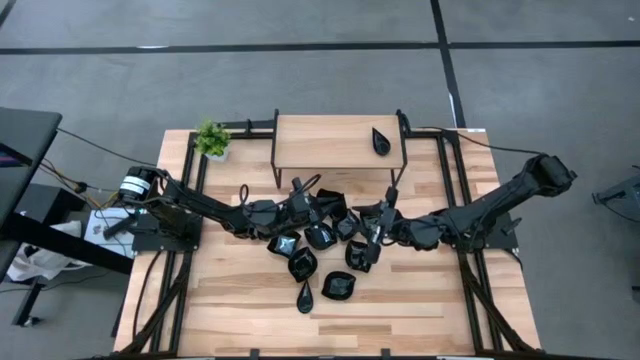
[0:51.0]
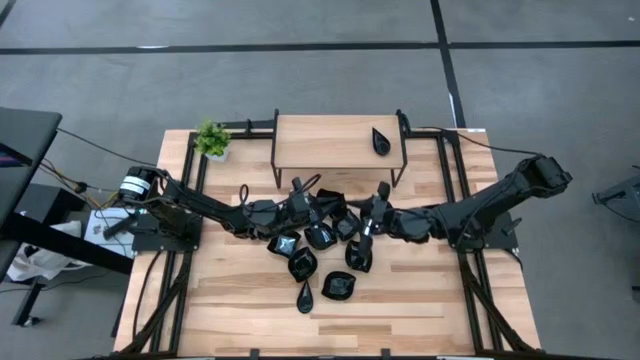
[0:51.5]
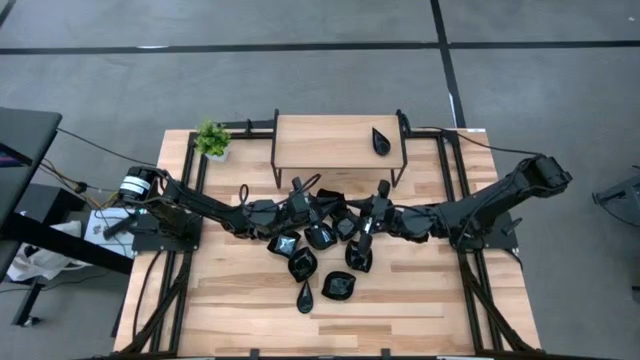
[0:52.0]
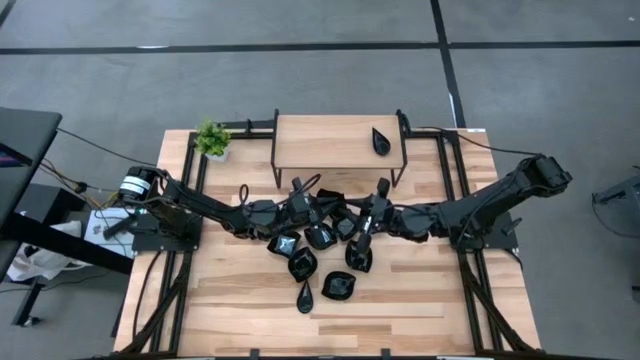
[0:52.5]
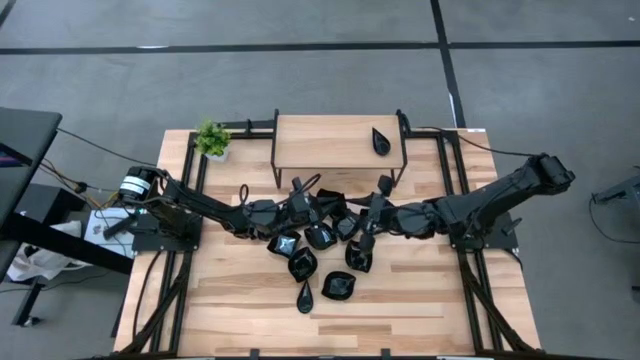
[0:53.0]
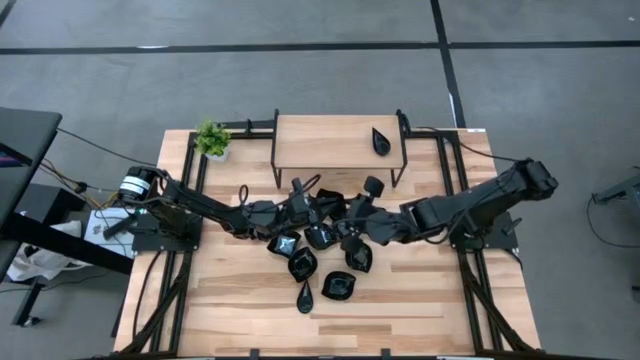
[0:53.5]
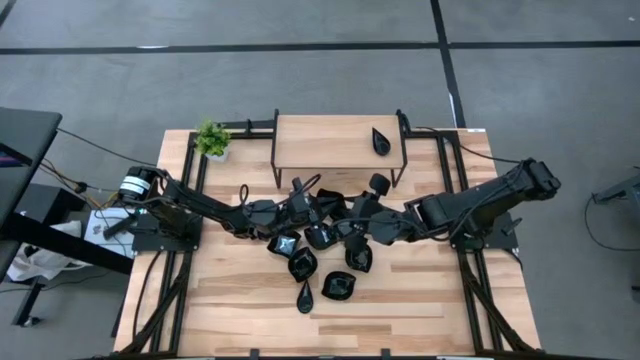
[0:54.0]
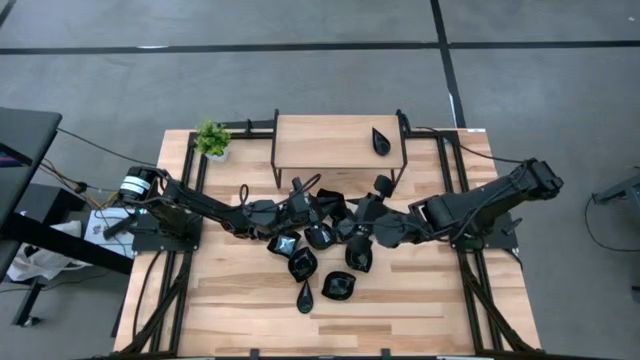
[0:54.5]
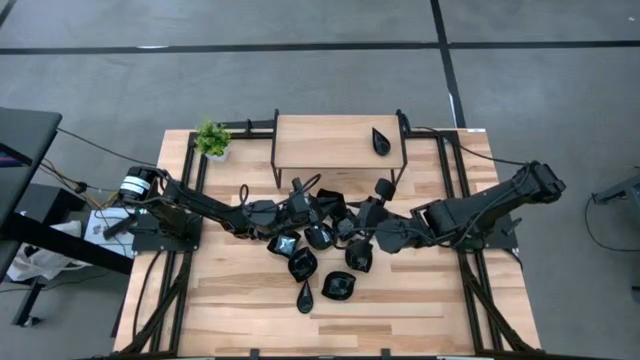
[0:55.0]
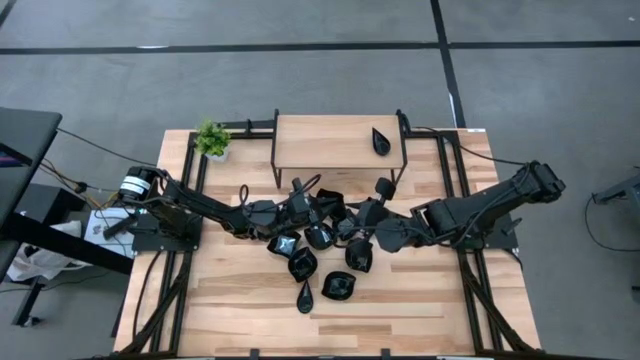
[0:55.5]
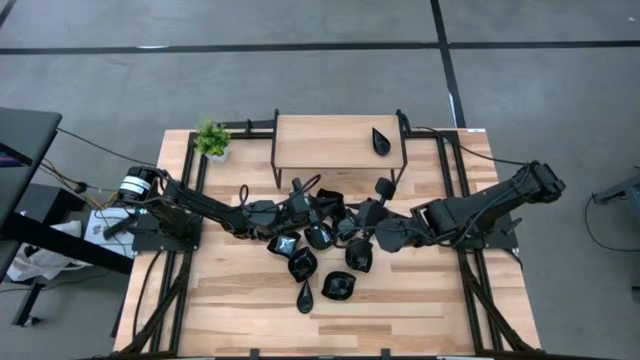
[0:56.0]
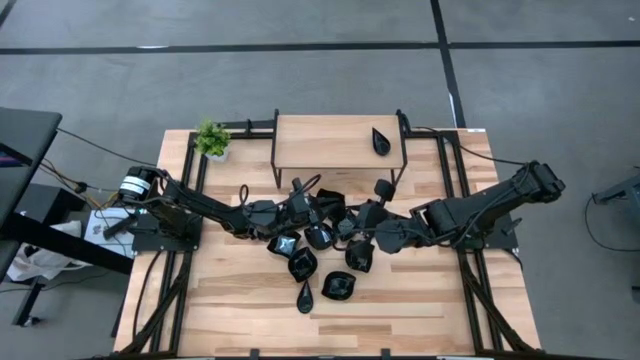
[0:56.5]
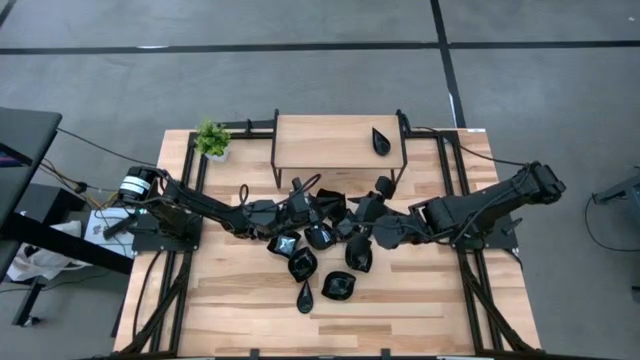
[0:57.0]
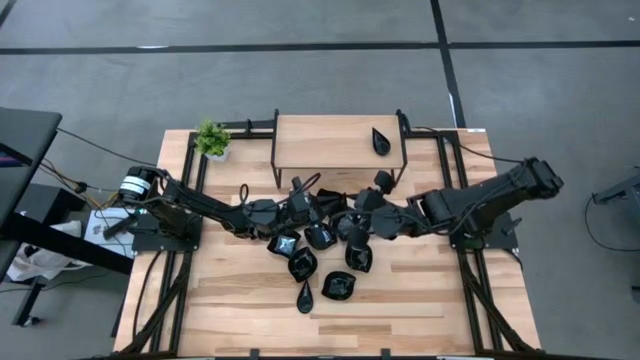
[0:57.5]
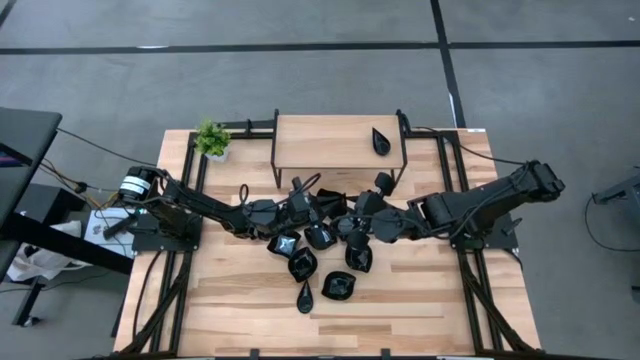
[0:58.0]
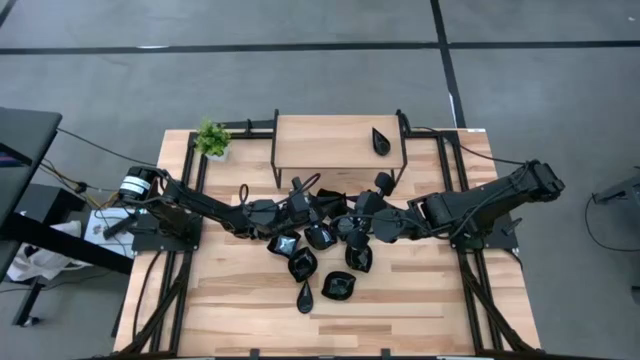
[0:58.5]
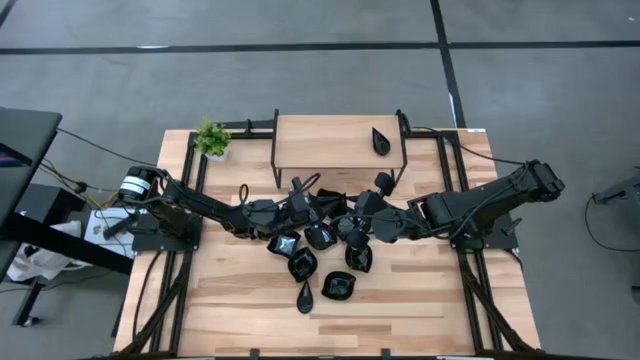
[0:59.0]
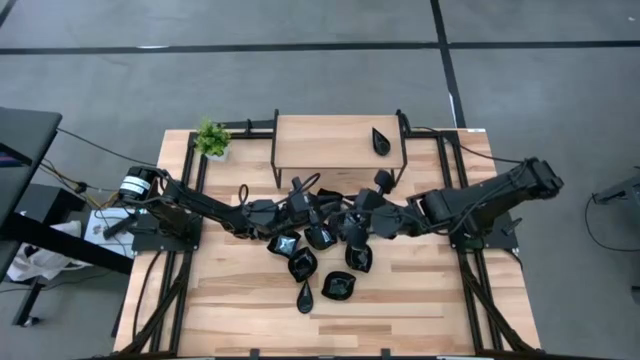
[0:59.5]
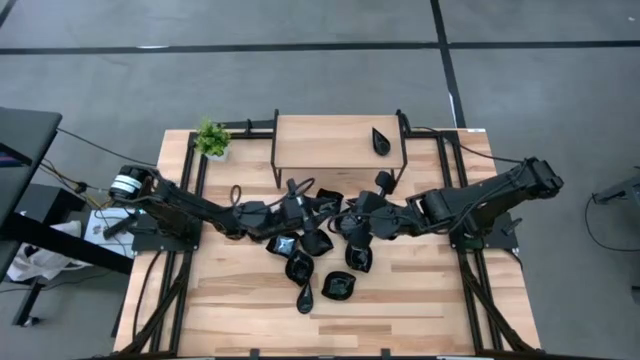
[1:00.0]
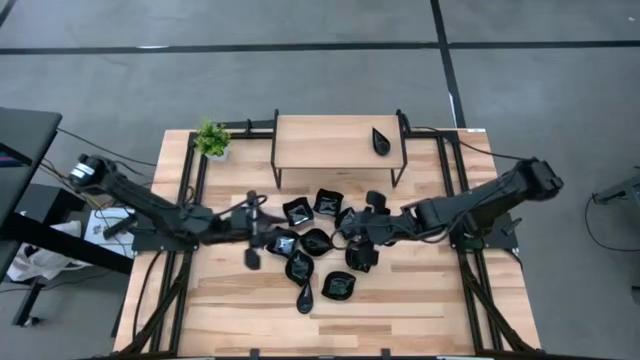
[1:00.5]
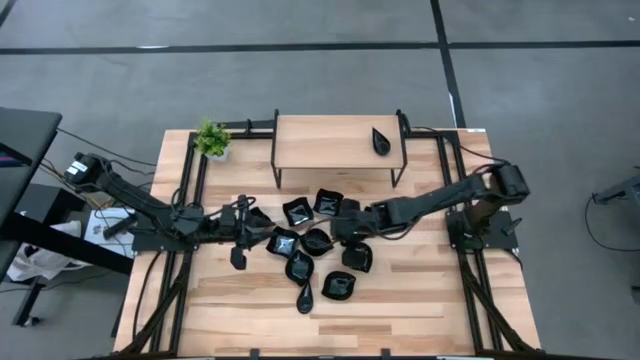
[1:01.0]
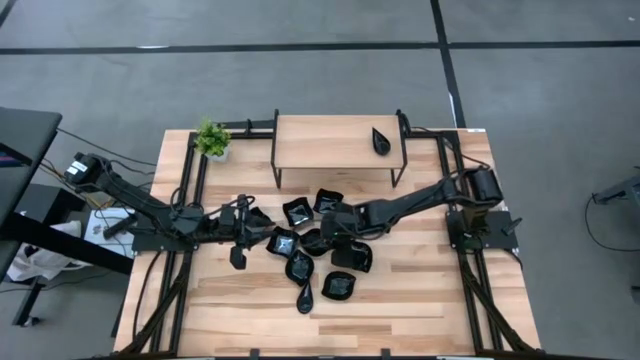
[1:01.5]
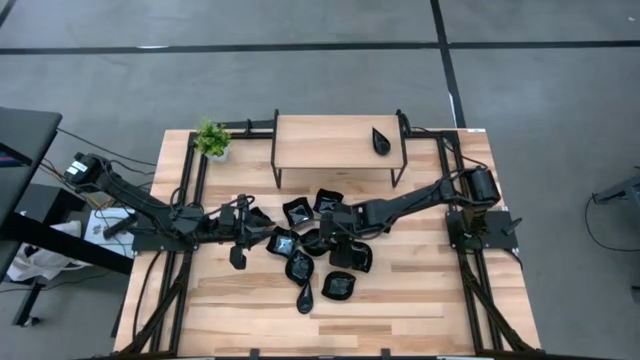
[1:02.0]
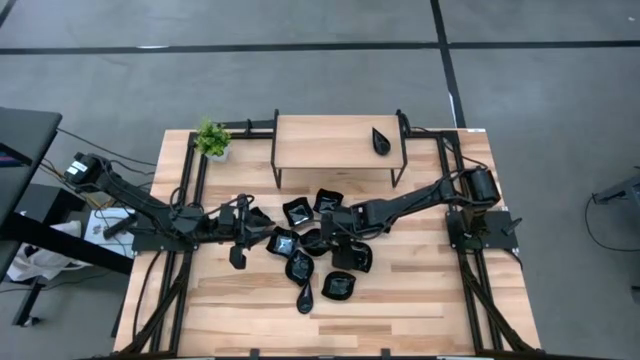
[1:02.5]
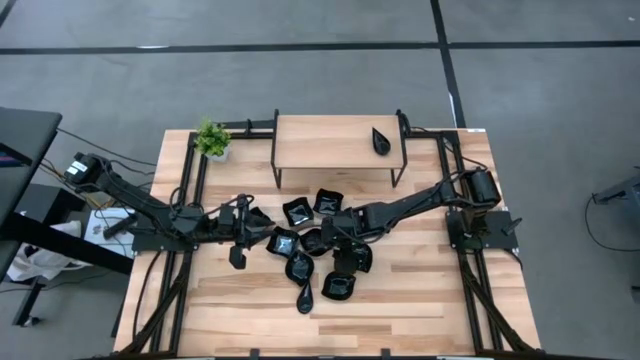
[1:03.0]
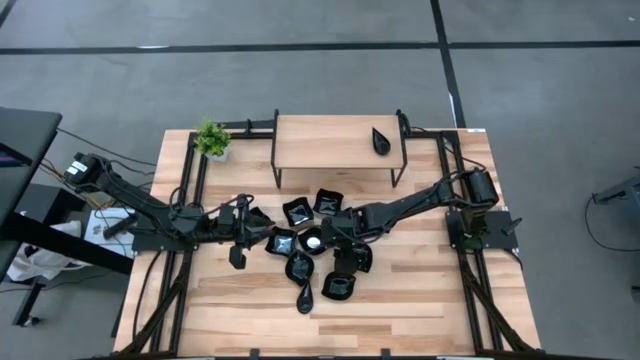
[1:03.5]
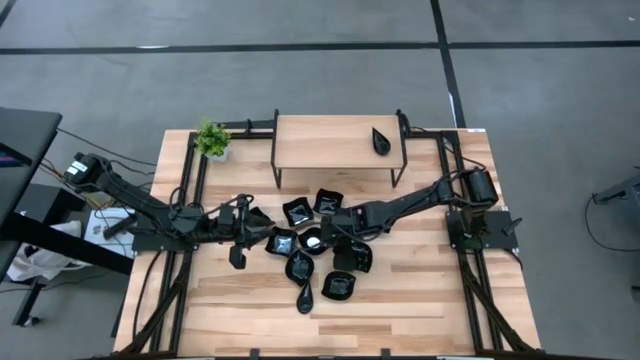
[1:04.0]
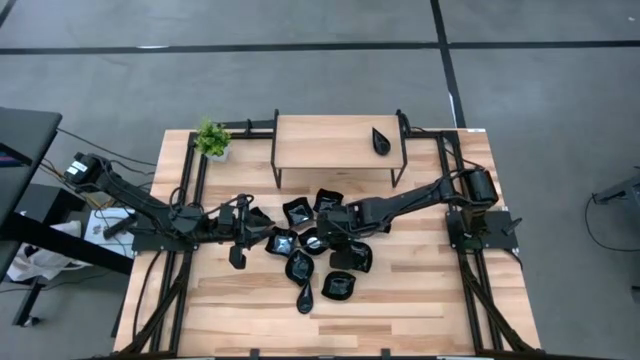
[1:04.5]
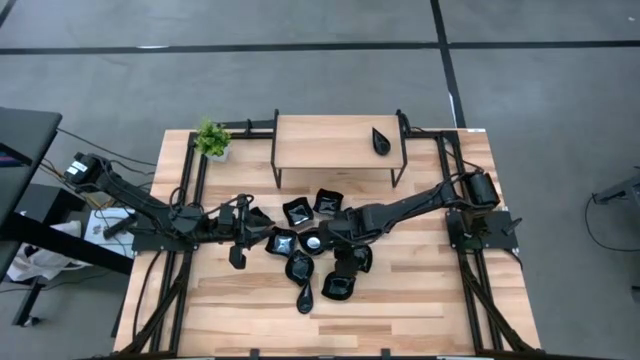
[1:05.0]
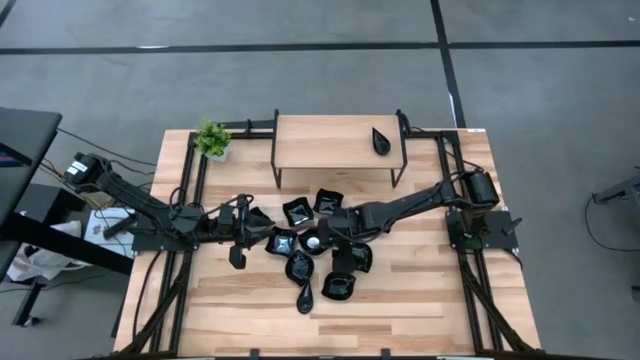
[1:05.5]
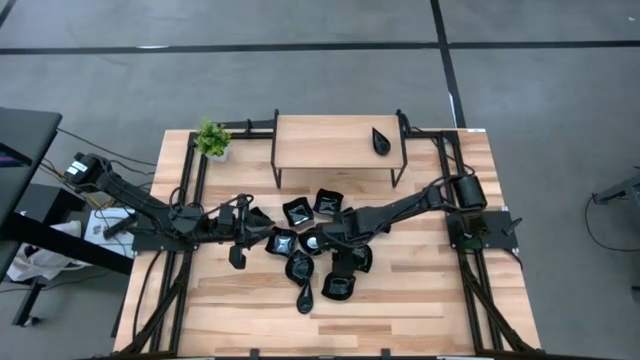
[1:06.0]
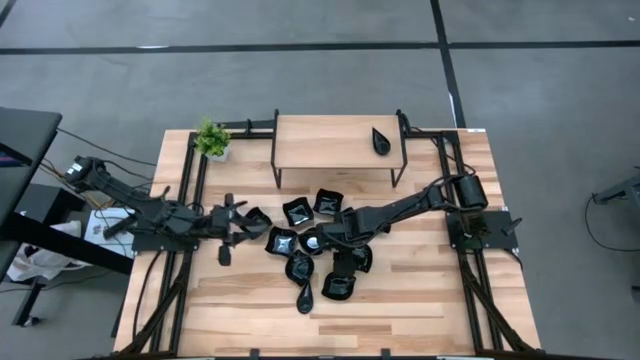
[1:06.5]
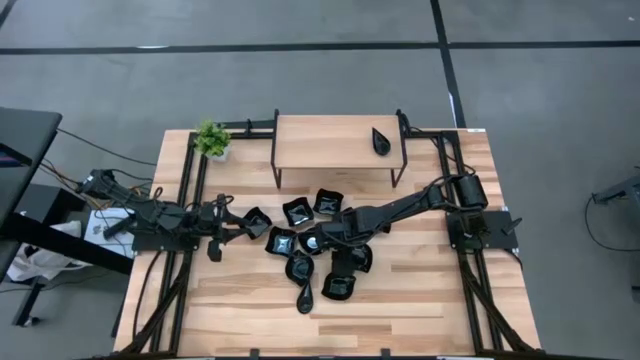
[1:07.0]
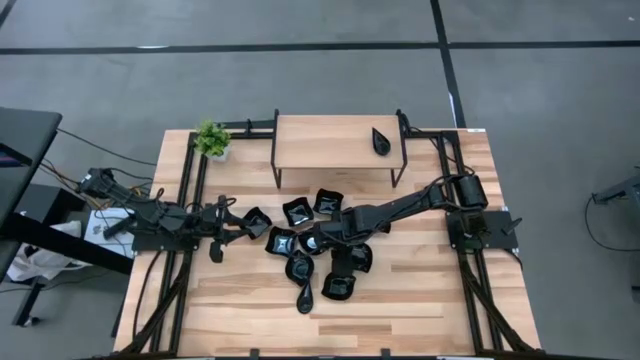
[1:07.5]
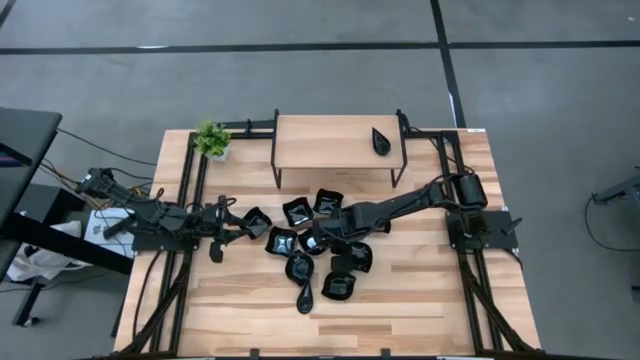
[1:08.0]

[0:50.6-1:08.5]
Task: Pick & Place Mini shaped plates
Stack the black drop shaped plate on top of the black drop shaped plate on the shelf

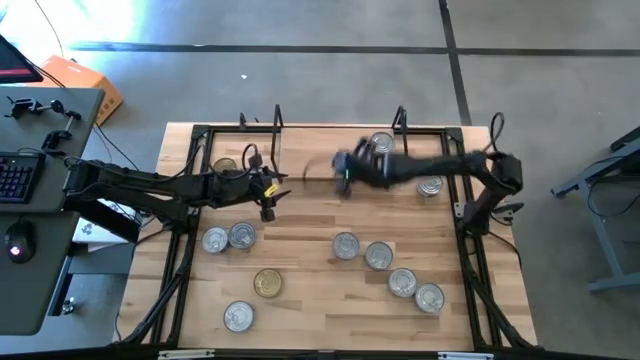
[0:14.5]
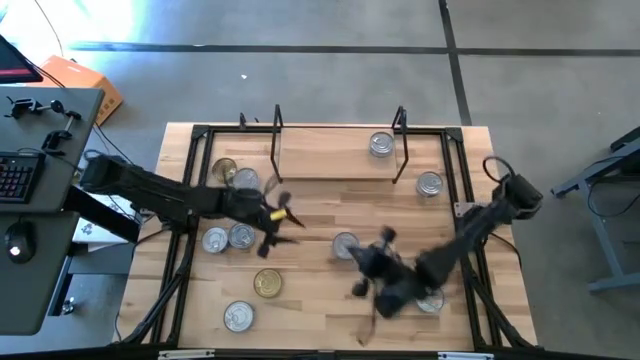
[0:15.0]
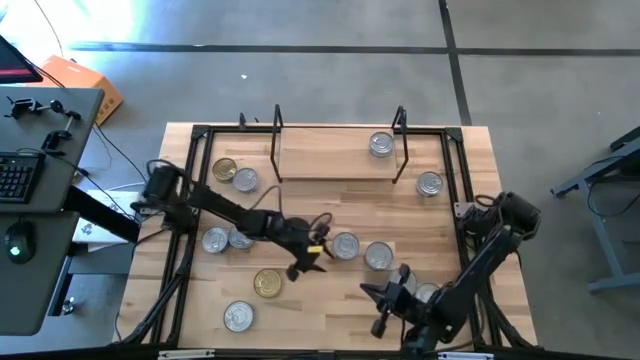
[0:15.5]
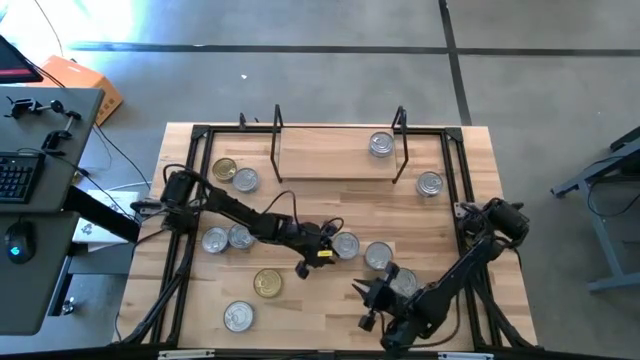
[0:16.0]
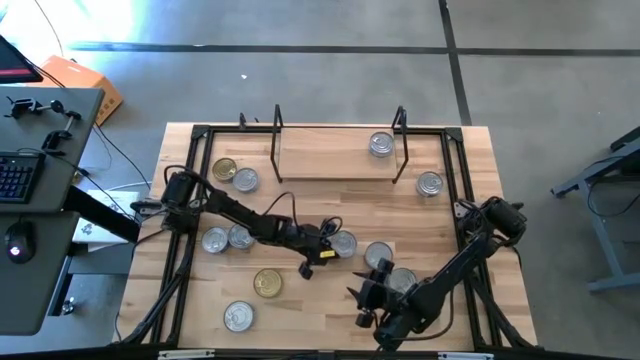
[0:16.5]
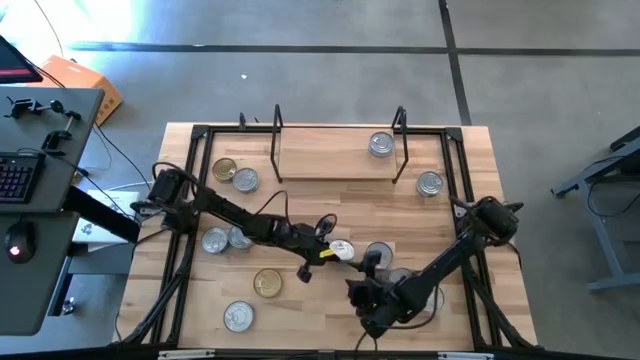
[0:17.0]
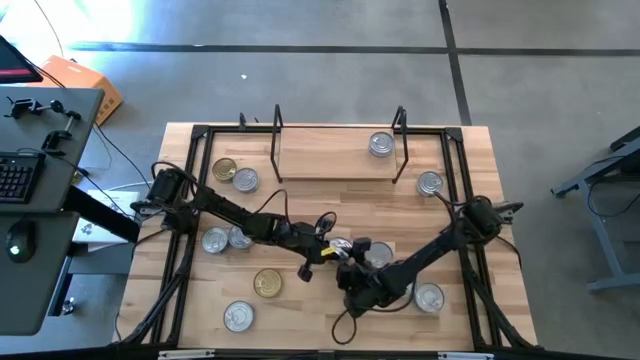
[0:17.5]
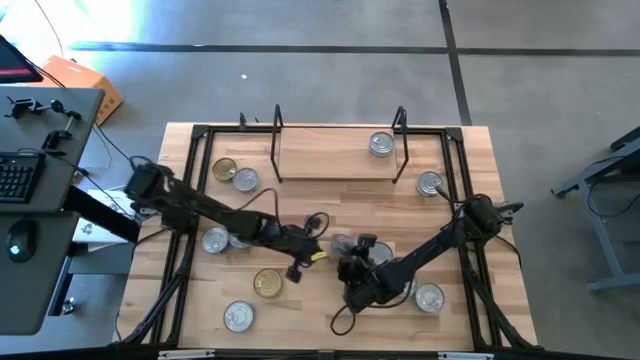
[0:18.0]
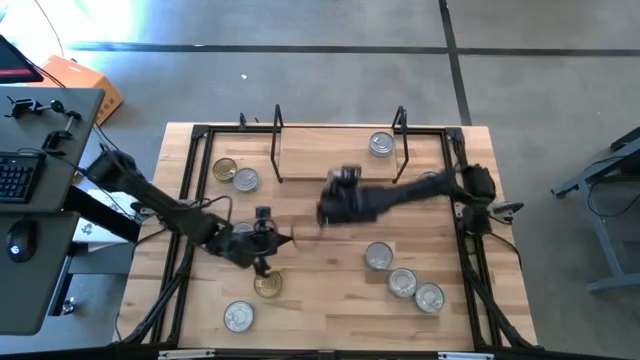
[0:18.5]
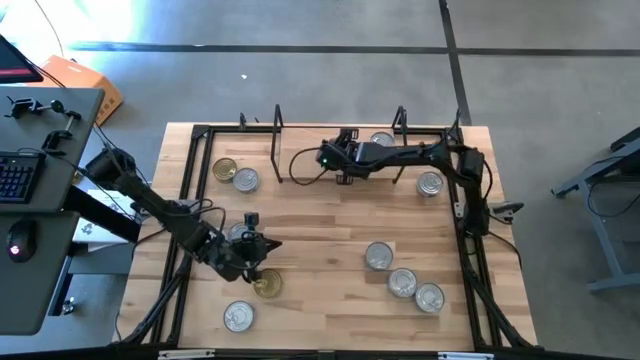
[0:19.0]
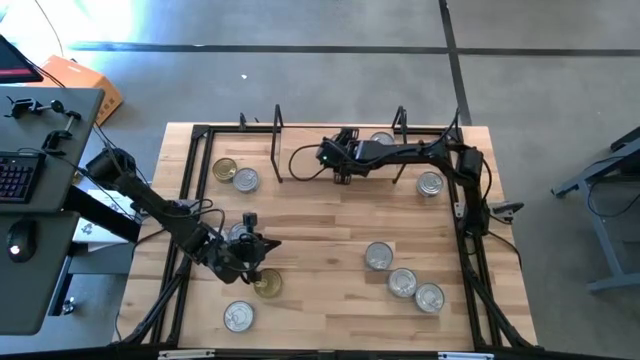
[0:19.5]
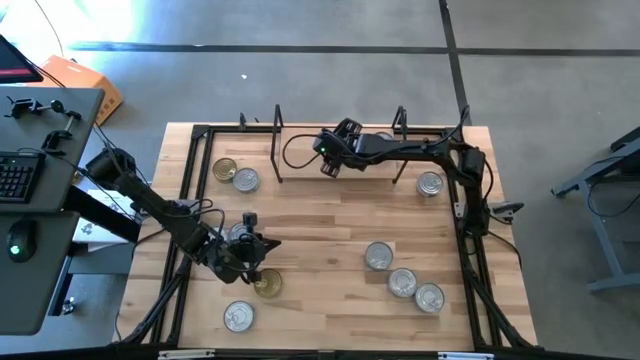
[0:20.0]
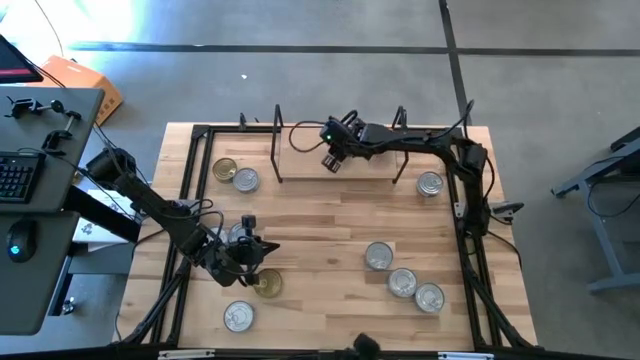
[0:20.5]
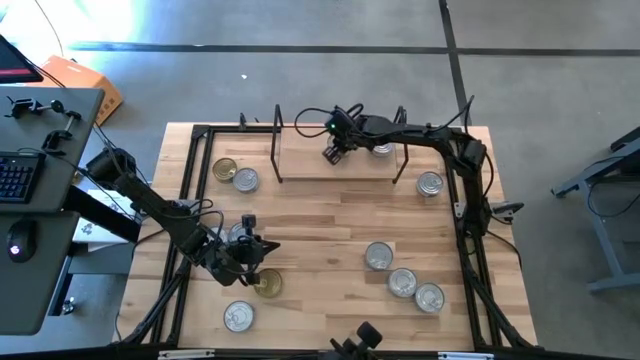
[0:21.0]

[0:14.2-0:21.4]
Task: Stack canned seafood by type on shelf
Put the green tuna can on the shelf
